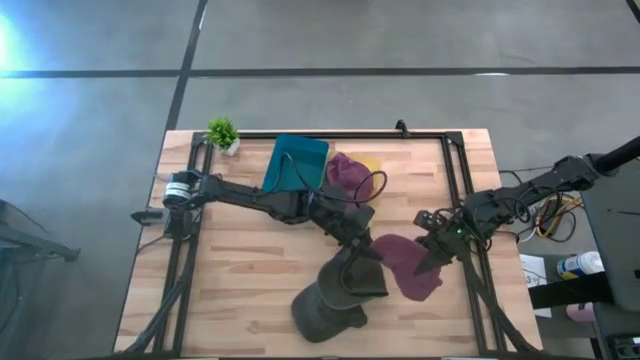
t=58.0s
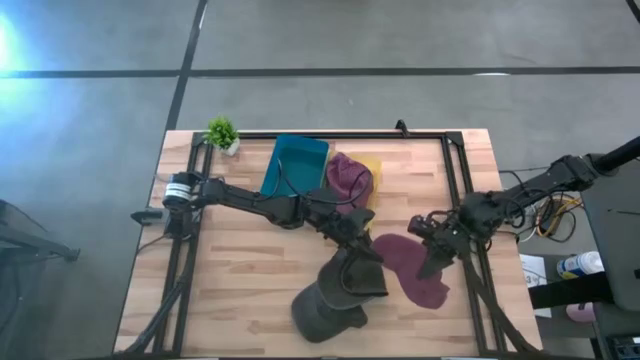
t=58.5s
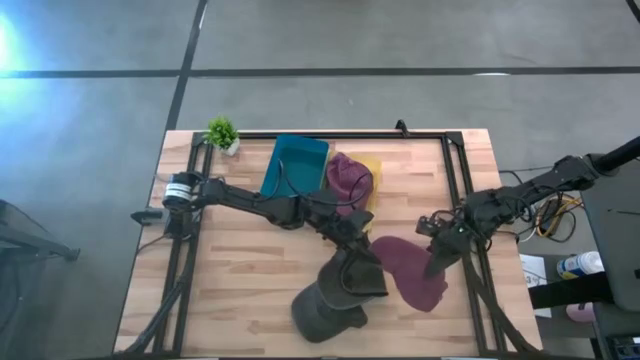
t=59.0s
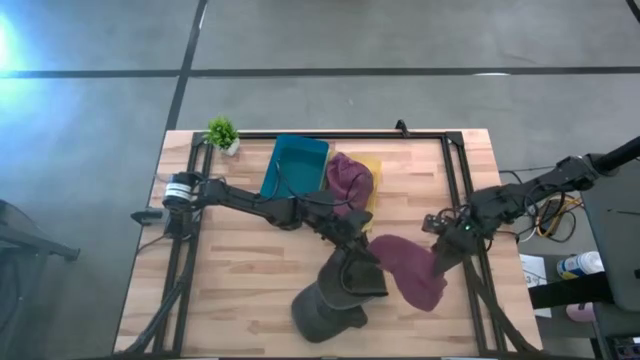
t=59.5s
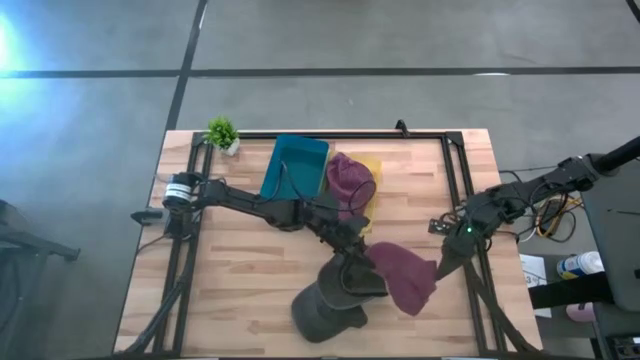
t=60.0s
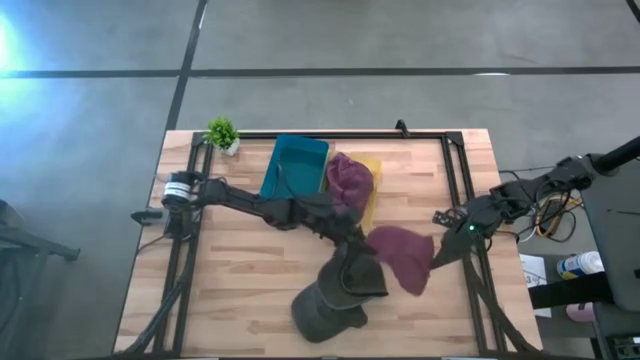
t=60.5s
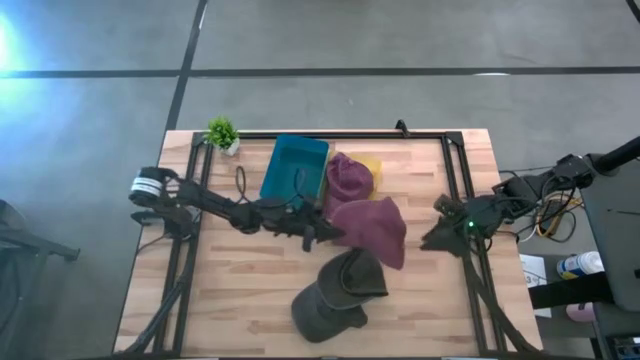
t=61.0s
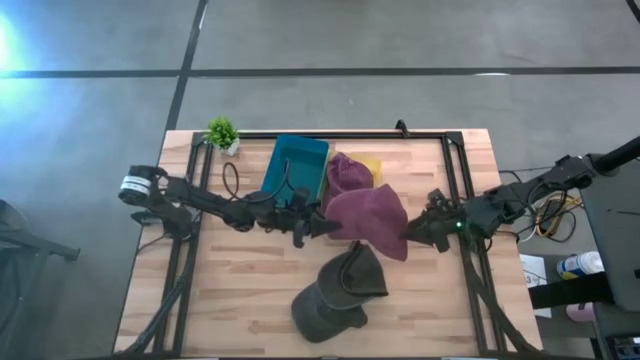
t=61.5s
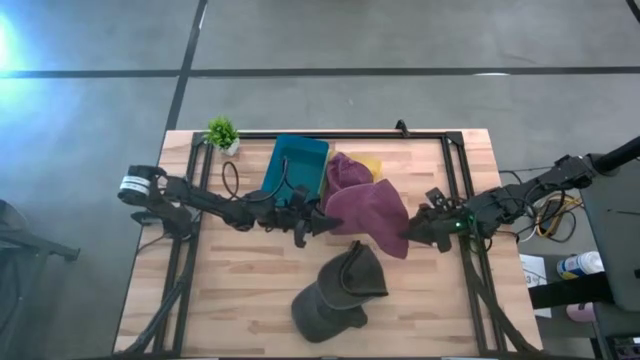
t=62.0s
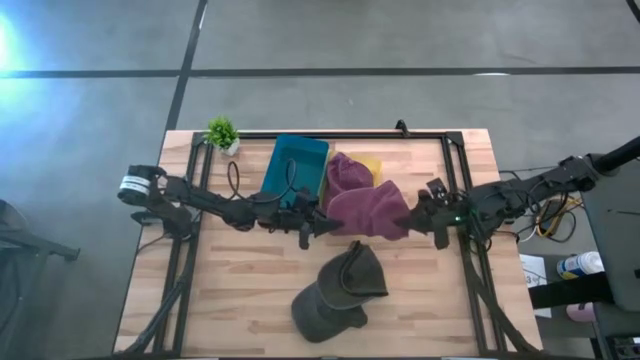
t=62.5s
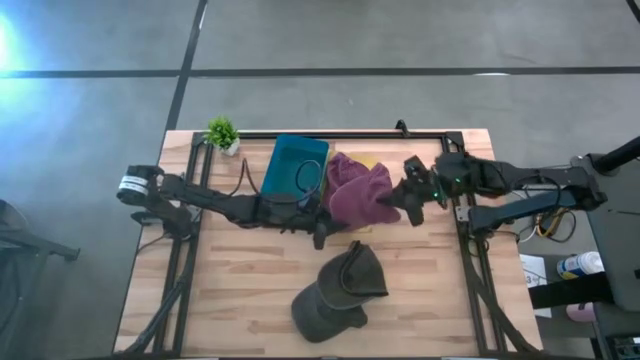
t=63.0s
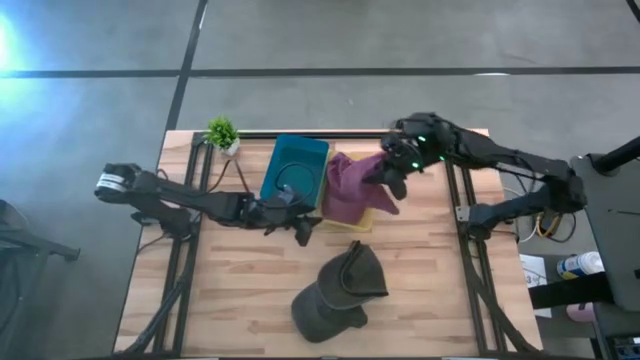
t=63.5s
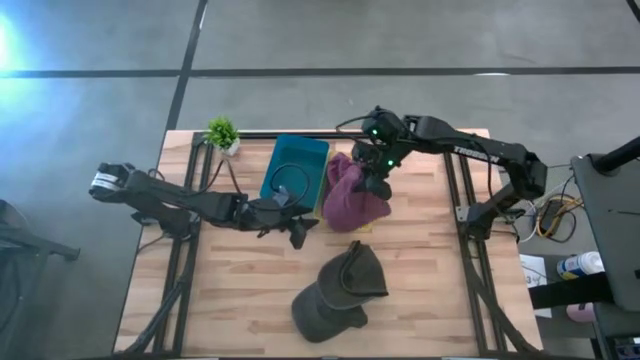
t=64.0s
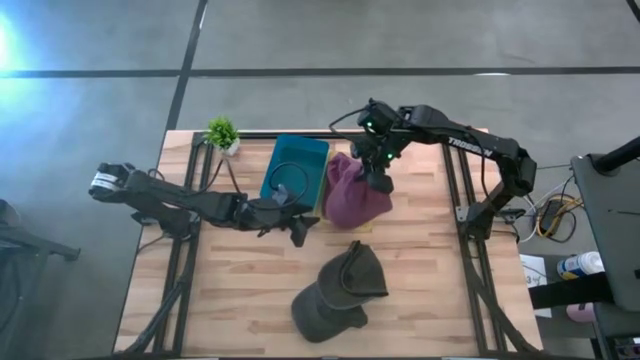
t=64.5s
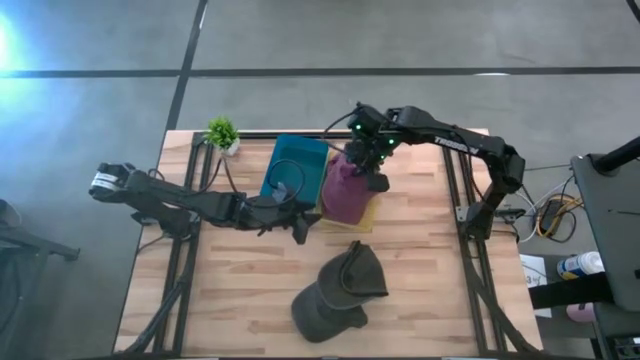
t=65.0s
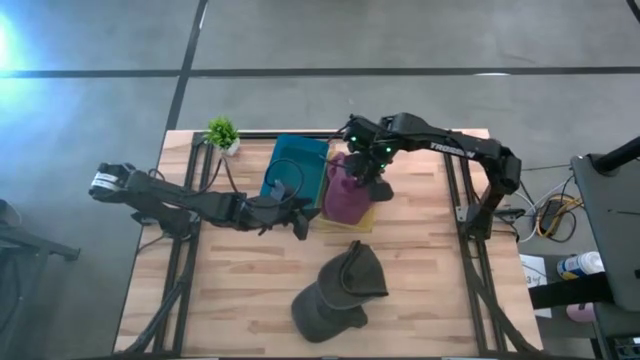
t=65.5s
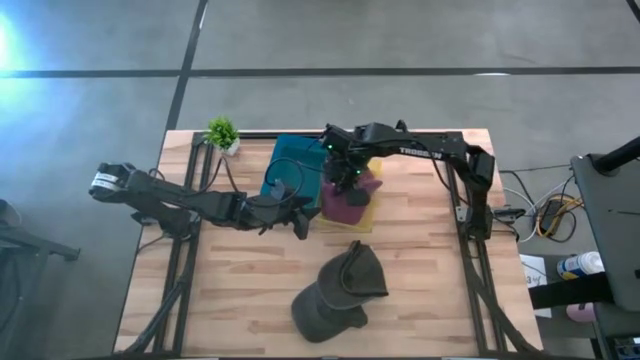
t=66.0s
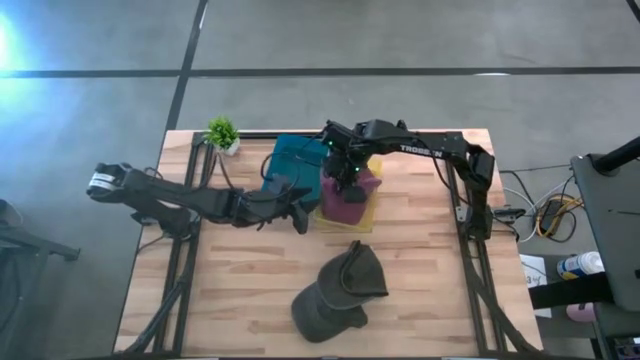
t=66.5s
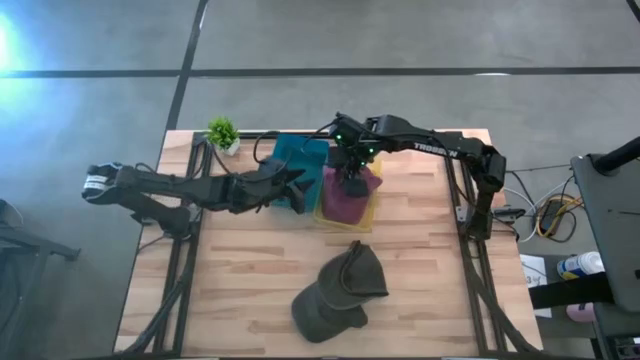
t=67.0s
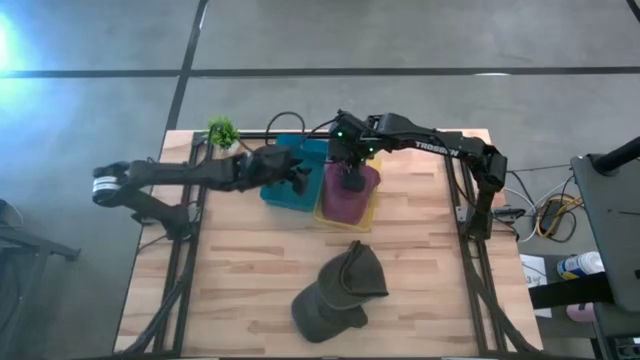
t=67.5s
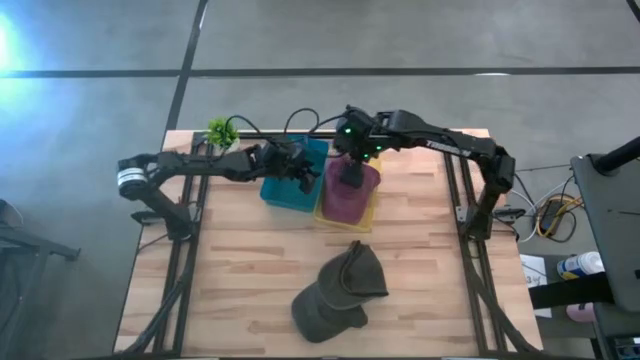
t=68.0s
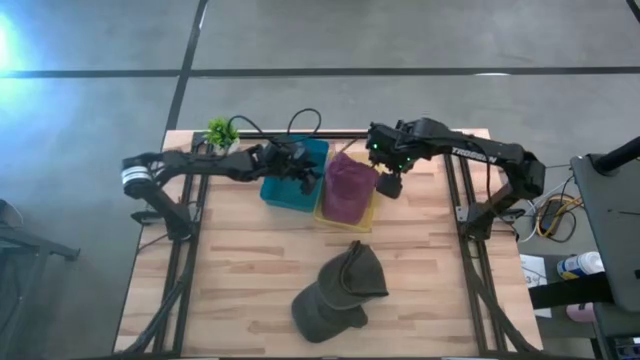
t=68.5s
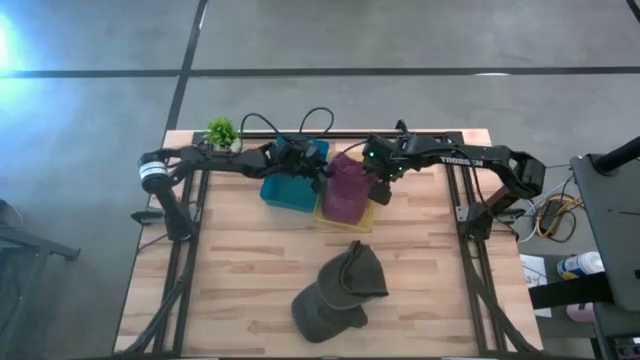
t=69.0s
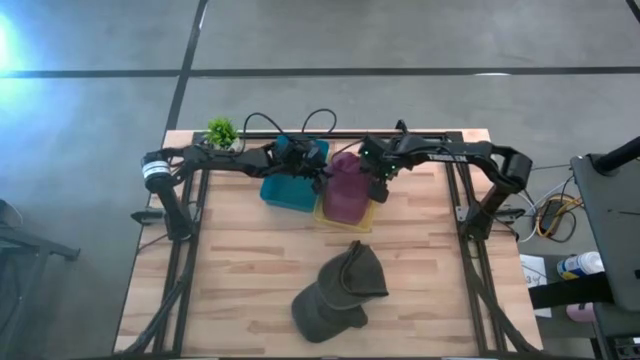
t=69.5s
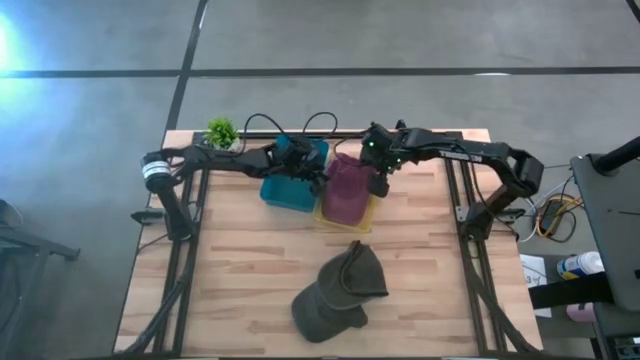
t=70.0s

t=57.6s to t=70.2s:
Task: Pick & Place hat
Put the red cap into the yellow bin

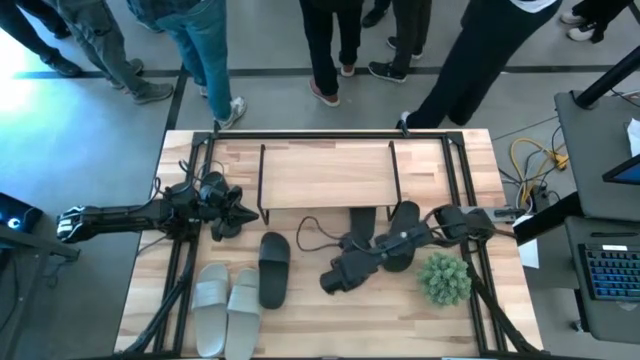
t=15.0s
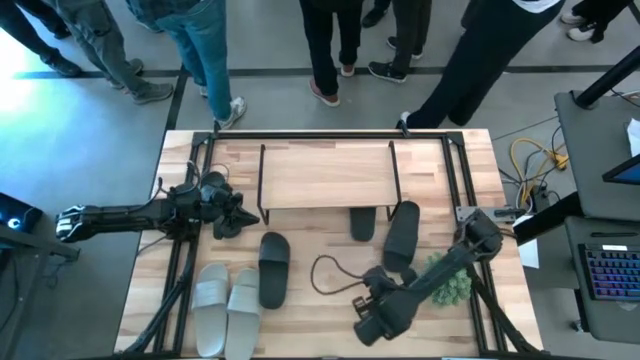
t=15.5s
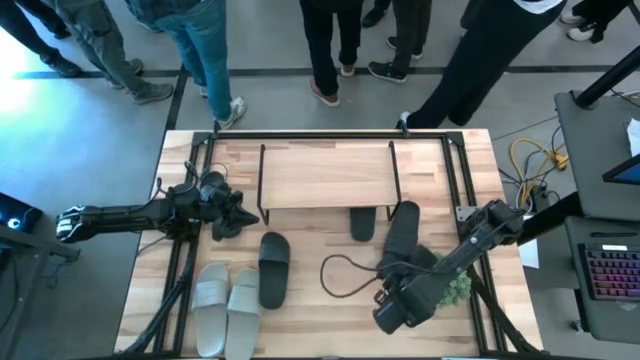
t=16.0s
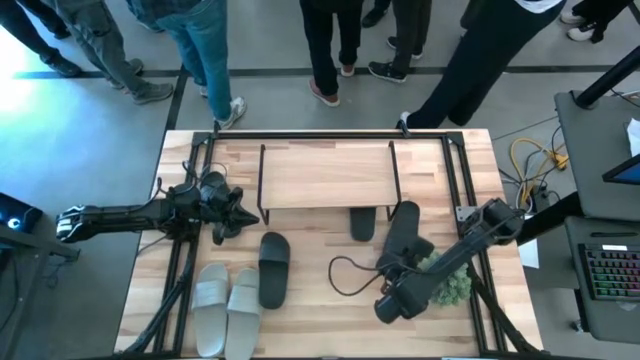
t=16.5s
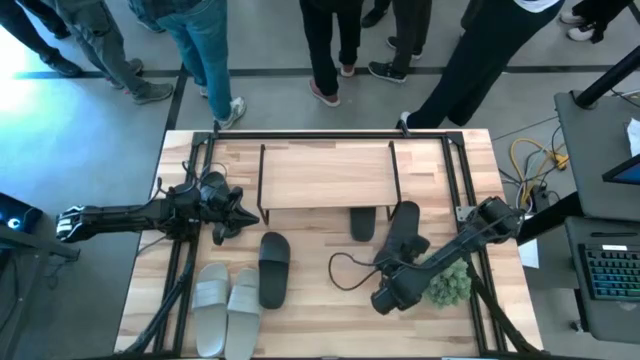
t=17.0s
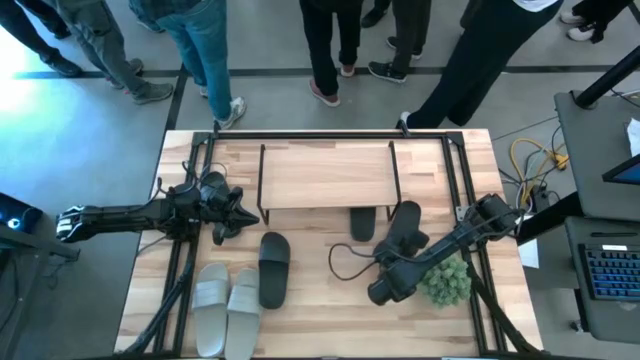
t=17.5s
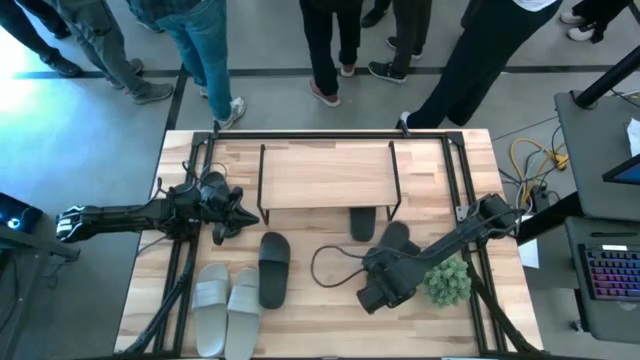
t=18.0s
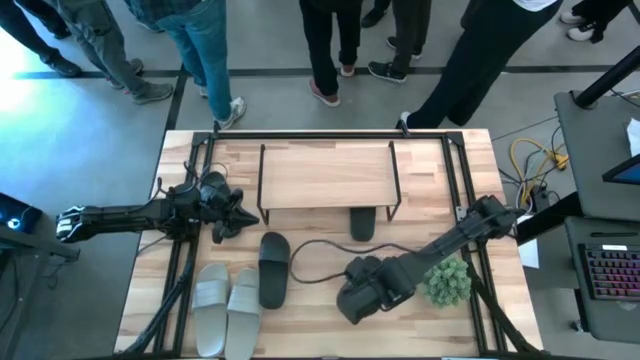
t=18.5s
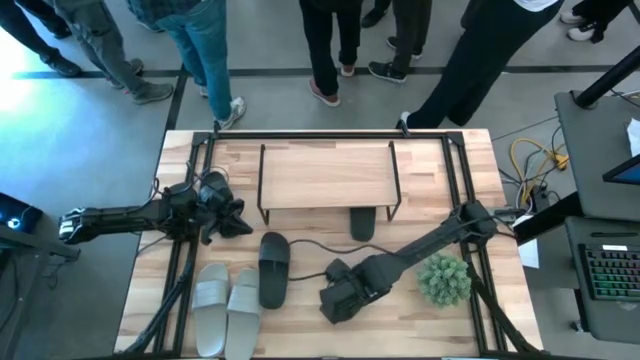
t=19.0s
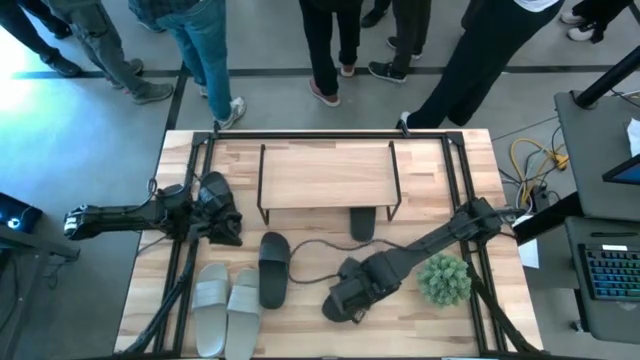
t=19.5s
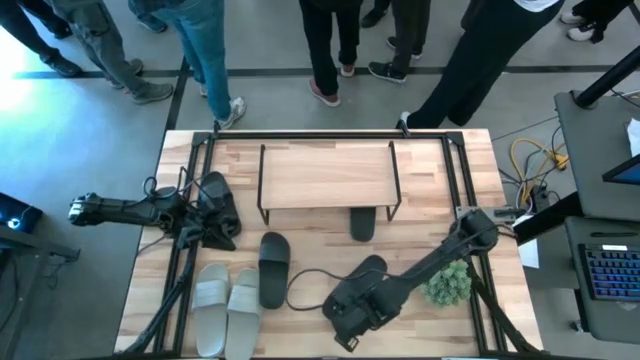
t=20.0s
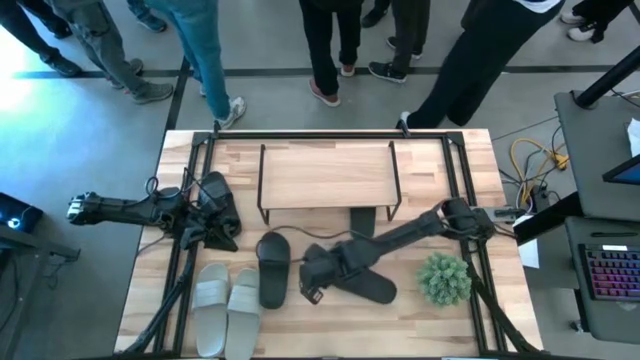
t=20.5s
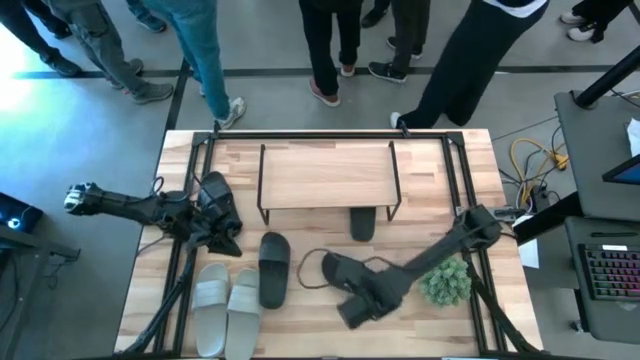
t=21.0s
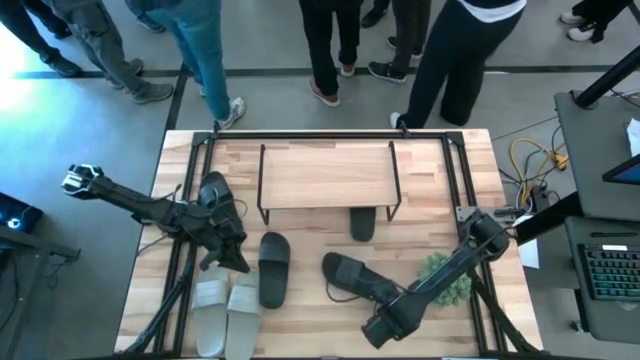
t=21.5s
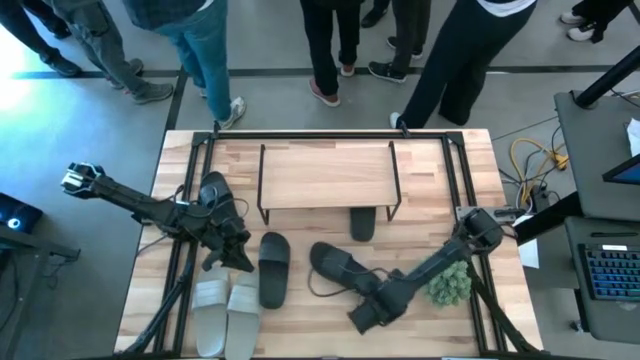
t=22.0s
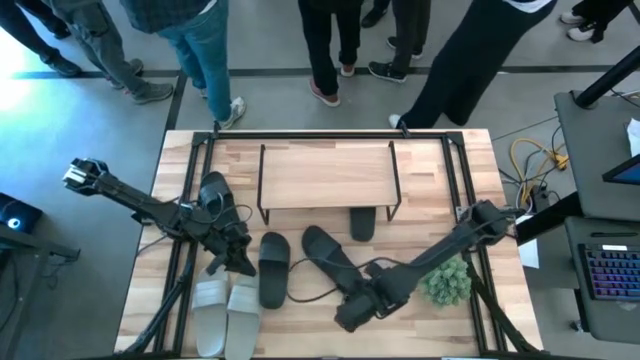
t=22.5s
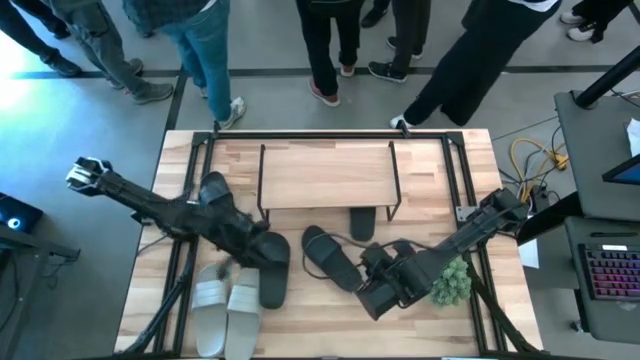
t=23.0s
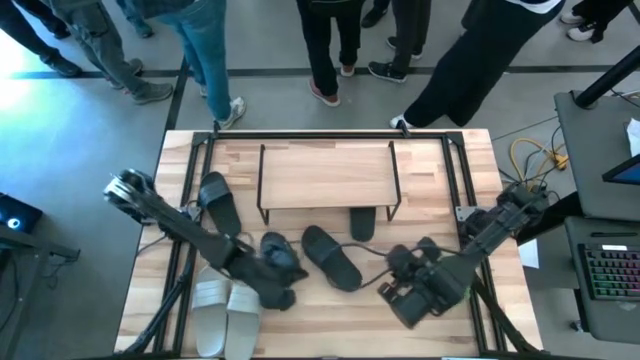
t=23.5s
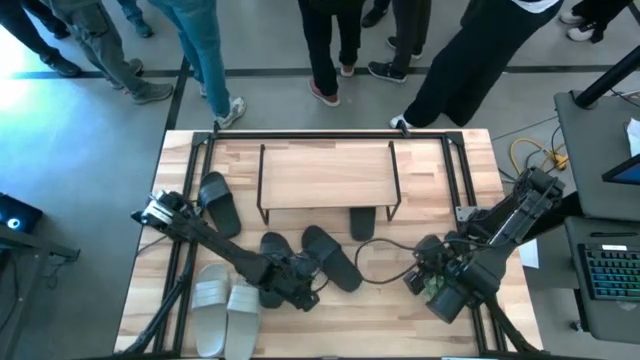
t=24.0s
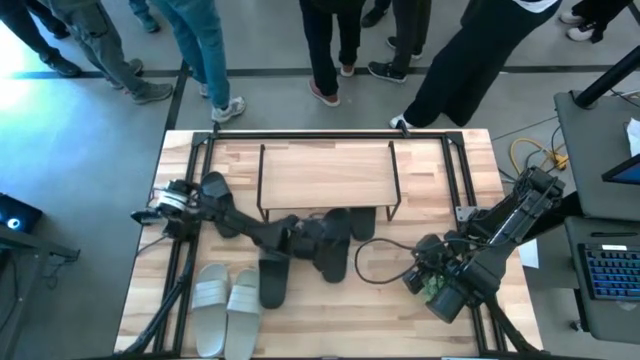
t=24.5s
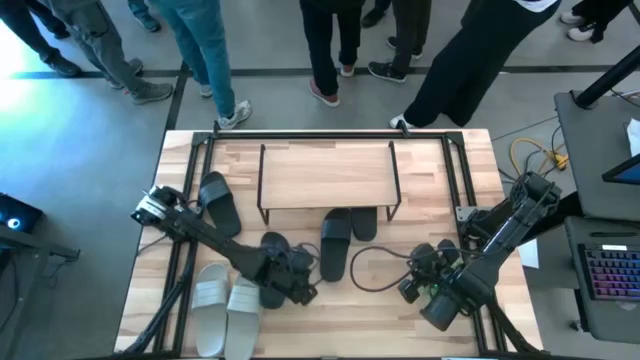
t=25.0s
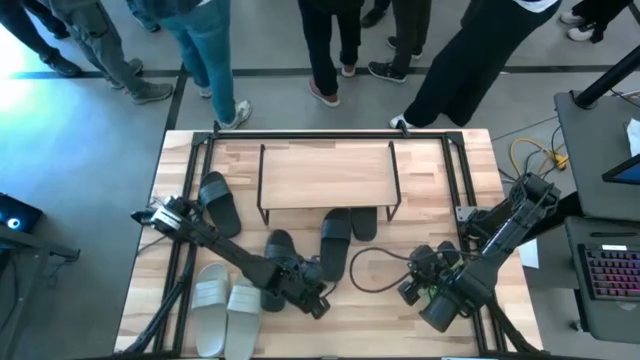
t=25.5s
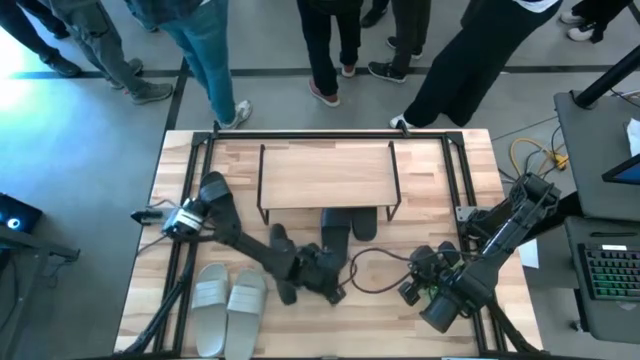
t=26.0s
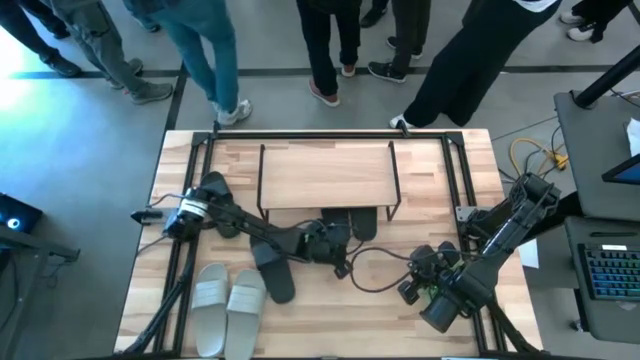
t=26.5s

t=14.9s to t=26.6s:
Task: Pick and place slides into the shelf
Put the right black slide under the shelf
